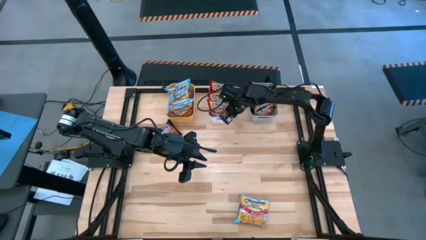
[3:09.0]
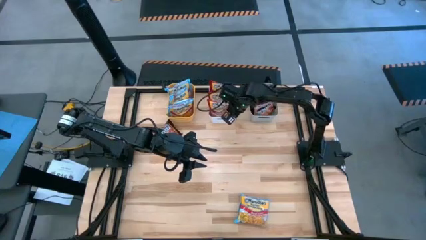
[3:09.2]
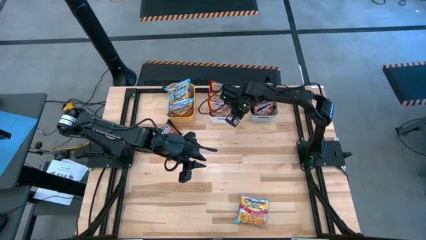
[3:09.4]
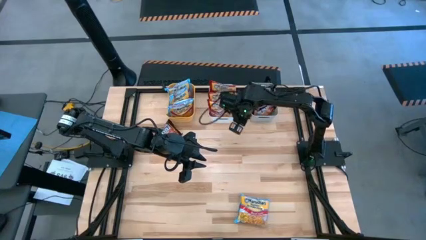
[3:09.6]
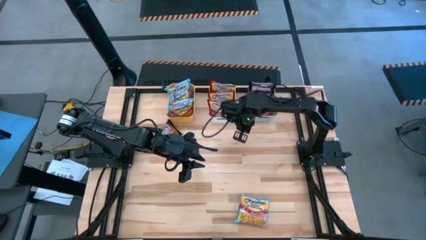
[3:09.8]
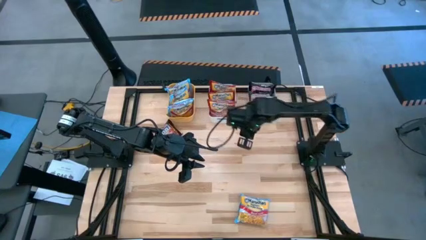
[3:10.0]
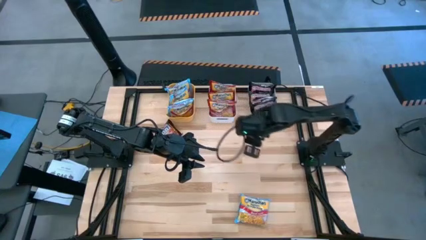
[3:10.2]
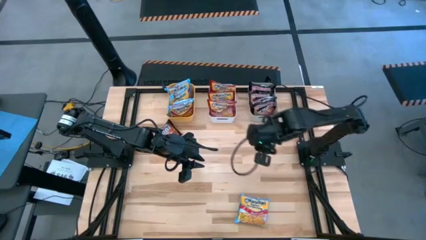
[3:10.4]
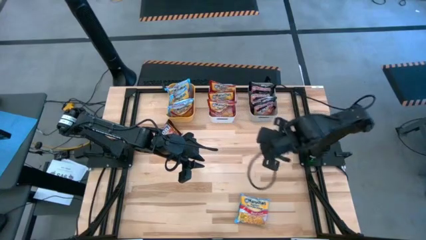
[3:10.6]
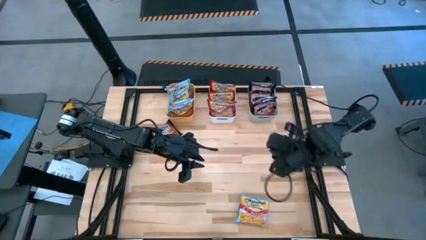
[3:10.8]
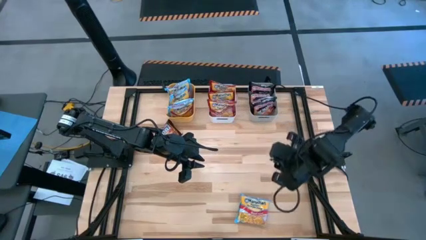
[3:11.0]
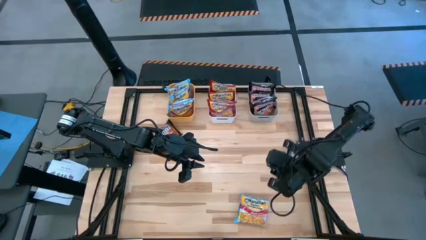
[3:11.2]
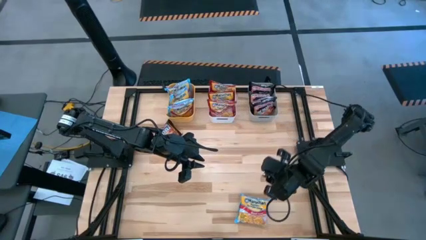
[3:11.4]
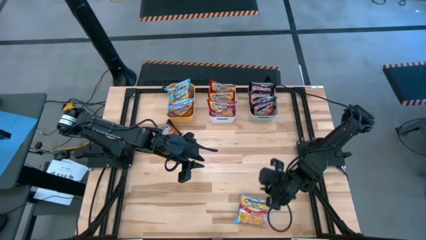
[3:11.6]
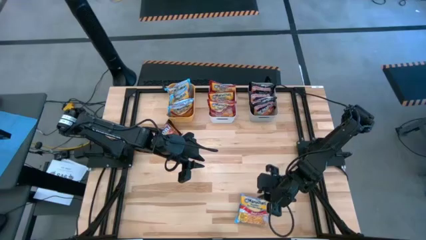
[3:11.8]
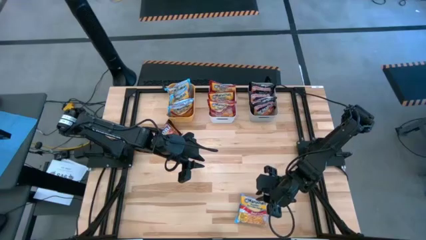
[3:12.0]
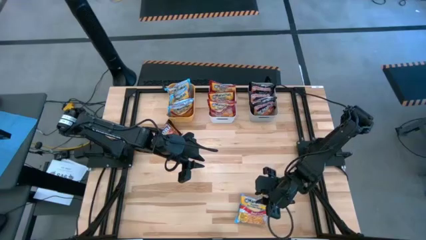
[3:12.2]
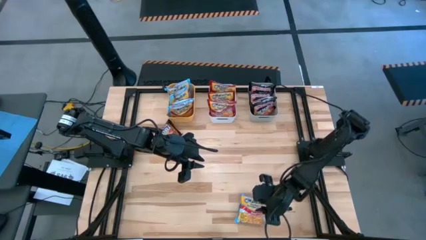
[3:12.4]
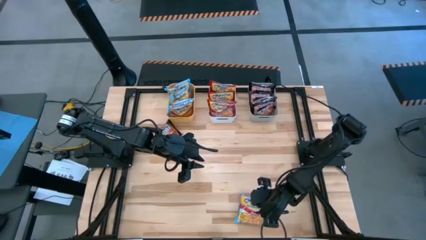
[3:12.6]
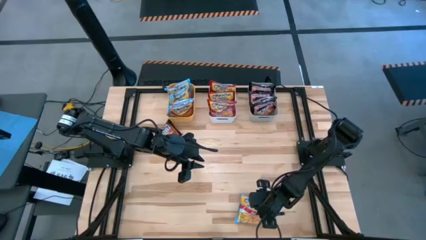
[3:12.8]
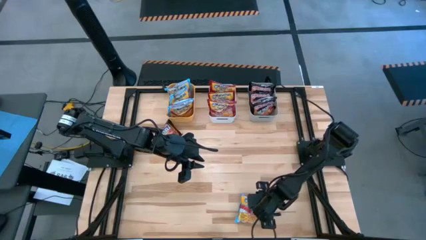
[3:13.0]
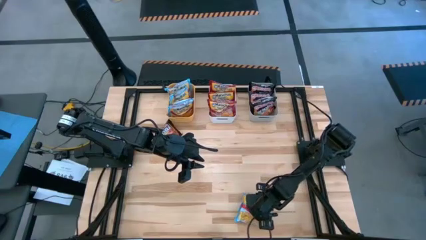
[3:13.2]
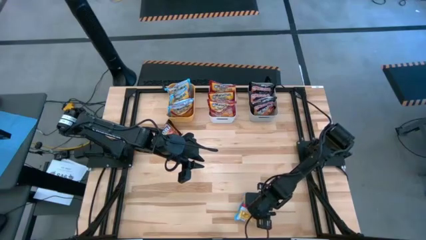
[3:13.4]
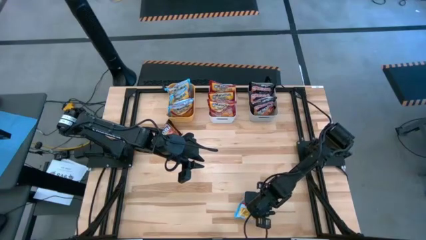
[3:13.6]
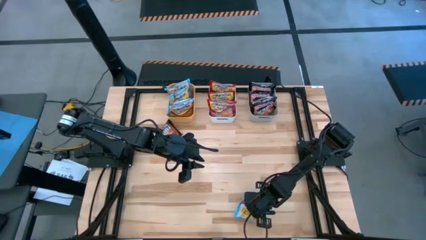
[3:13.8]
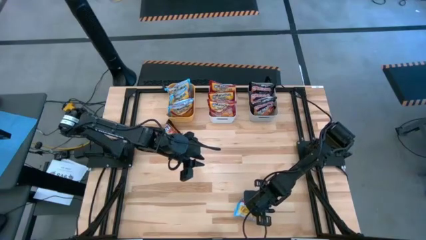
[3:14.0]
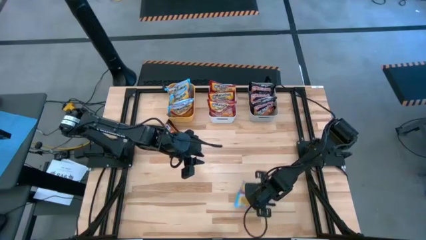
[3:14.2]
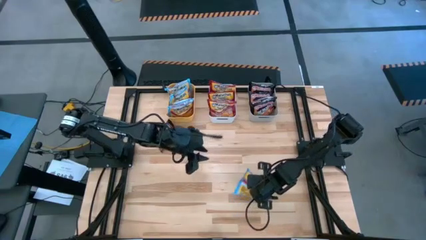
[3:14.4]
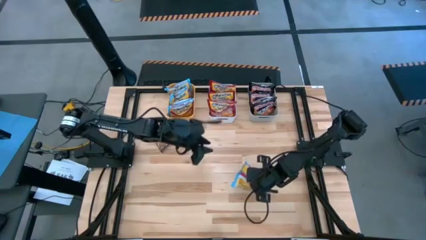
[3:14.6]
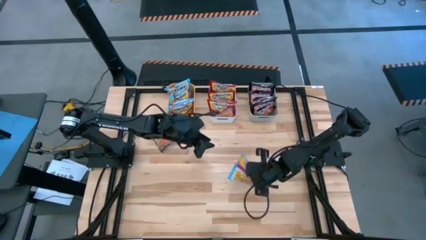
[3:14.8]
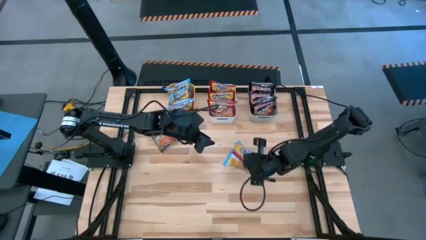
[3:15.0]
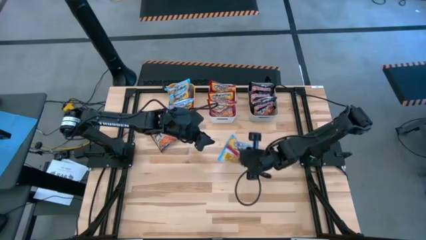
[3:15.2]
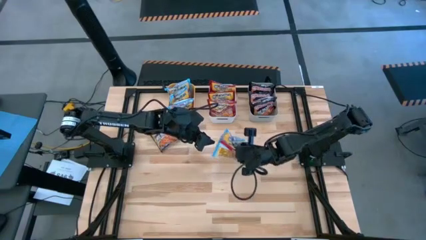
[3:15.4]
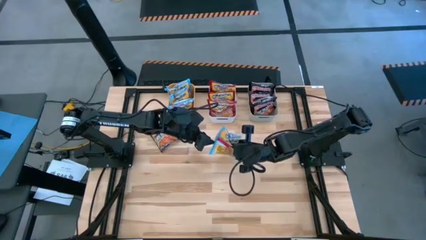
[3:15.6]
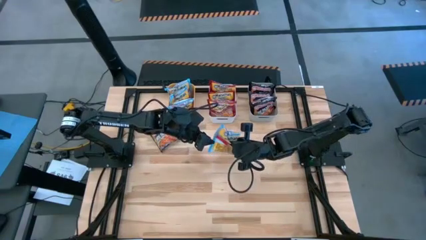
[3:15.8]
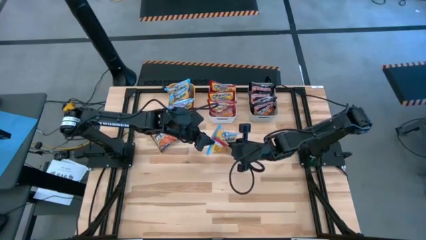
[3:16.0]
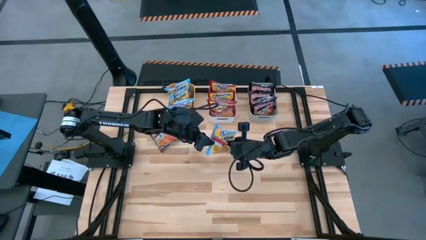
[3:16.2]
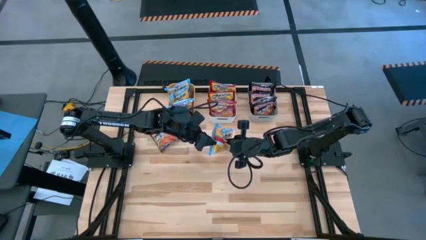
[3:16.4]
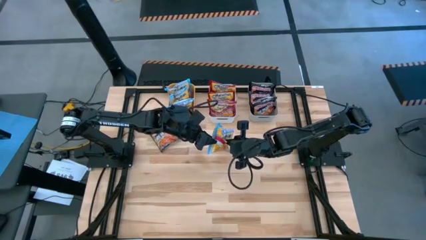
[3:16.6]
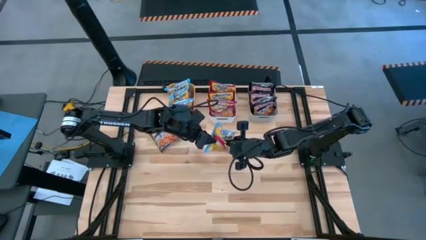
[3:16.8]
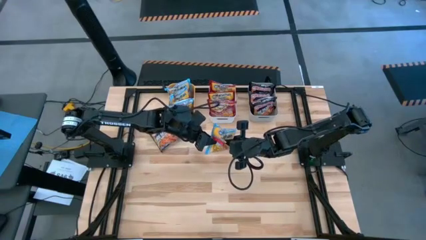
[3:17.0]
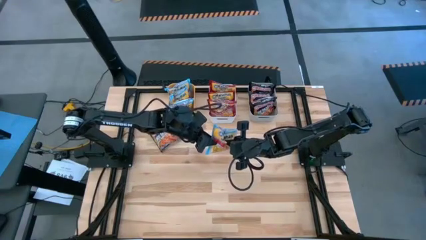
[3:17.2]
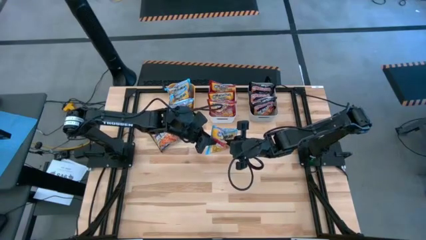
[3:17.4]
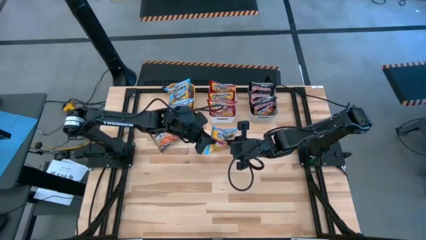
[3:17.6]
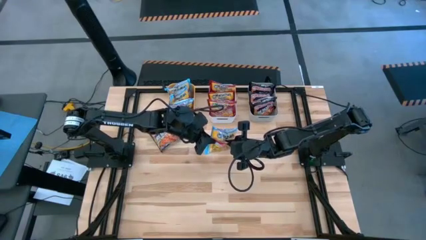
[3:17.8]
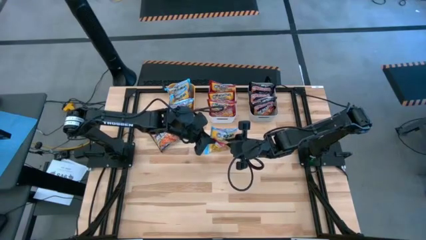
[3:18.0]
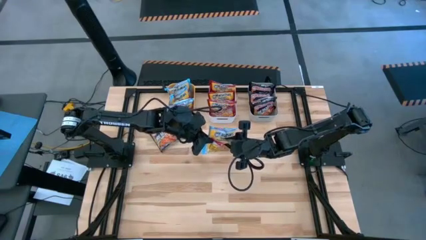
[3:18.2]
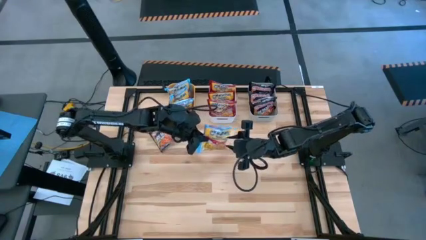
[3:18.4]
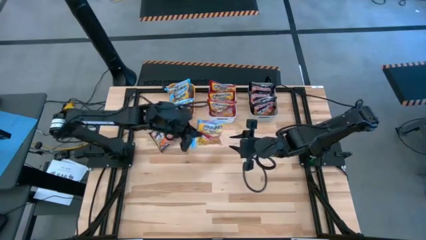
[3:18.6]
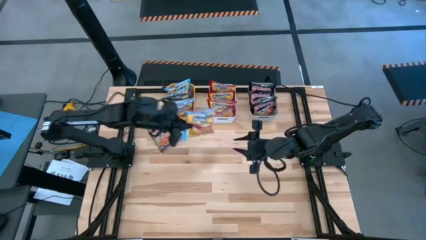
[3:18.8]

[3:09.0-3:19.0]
Task: Sort Maruchan noodles
Put the blue noodle pack into the orange bin

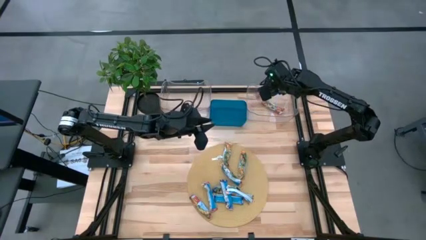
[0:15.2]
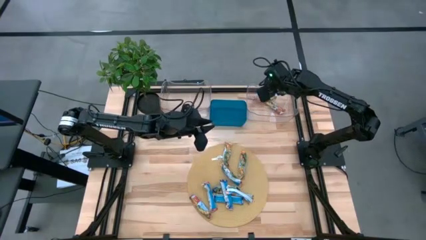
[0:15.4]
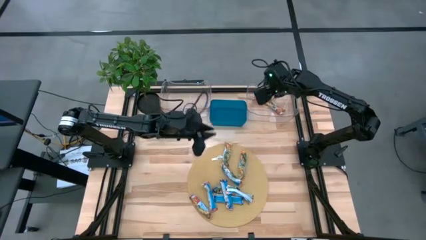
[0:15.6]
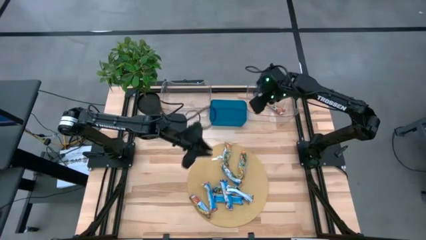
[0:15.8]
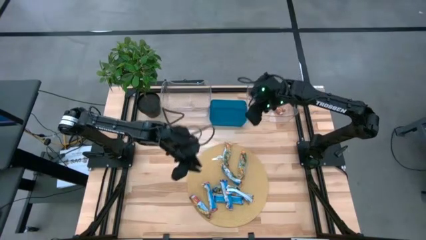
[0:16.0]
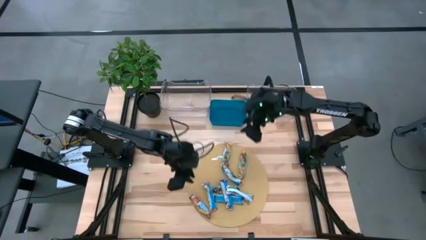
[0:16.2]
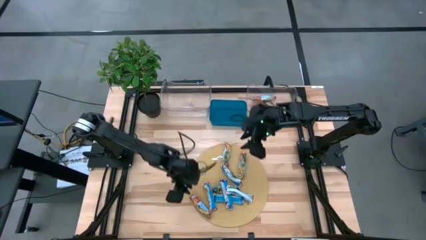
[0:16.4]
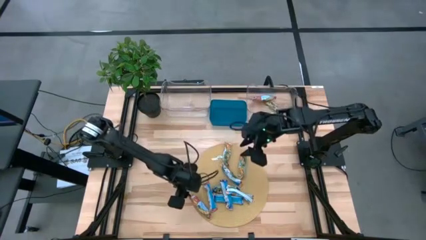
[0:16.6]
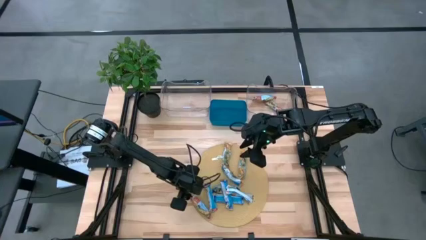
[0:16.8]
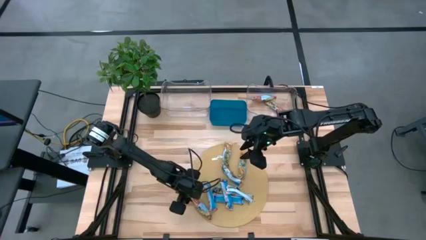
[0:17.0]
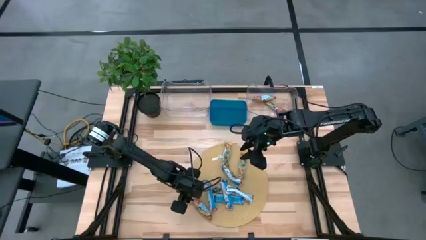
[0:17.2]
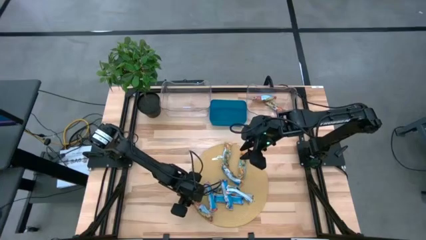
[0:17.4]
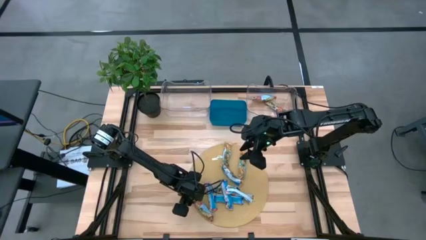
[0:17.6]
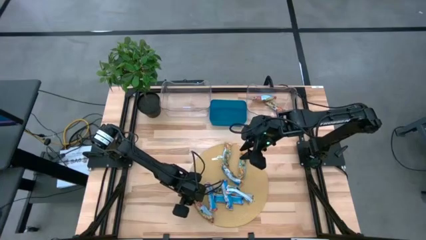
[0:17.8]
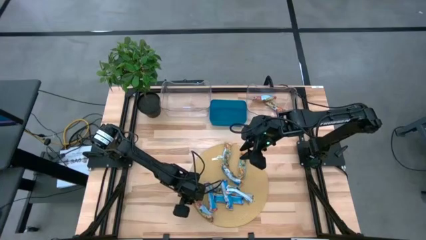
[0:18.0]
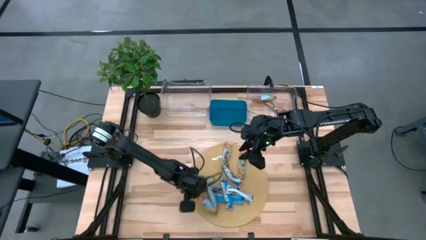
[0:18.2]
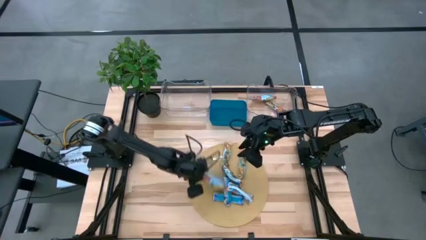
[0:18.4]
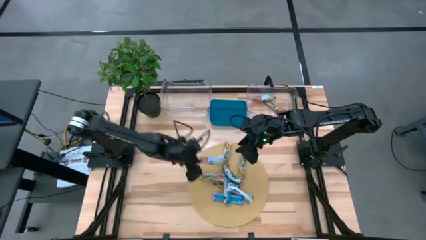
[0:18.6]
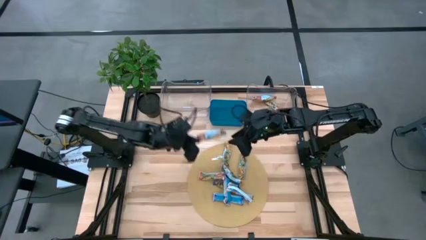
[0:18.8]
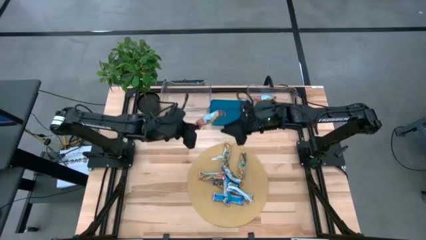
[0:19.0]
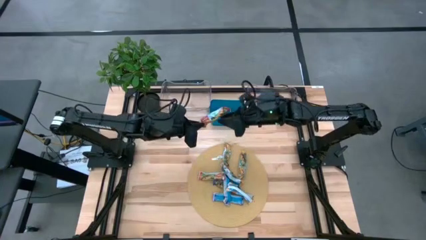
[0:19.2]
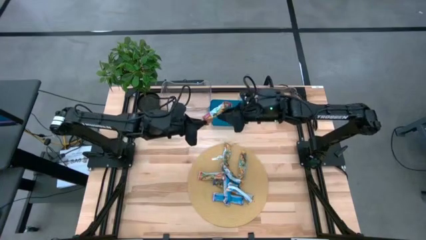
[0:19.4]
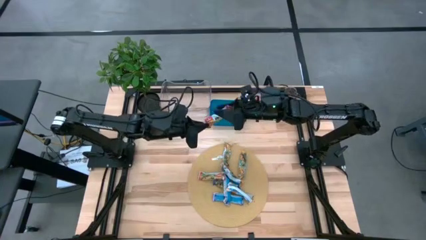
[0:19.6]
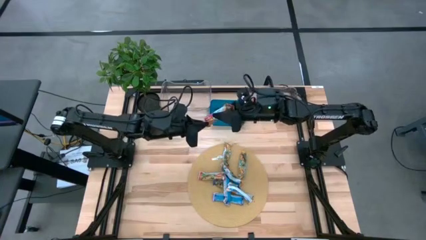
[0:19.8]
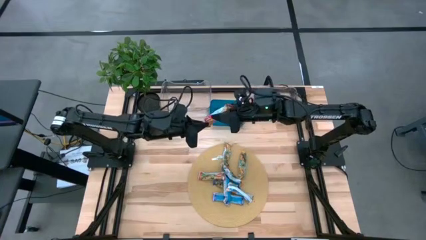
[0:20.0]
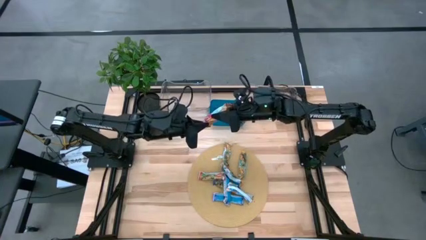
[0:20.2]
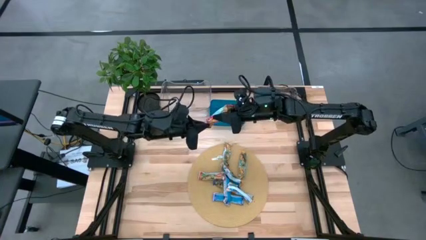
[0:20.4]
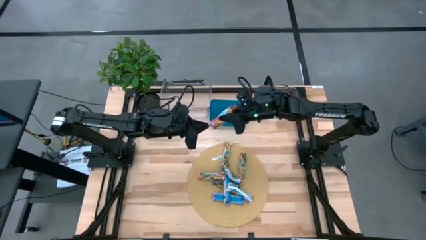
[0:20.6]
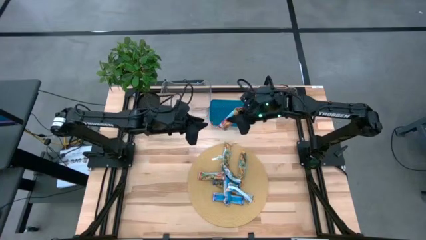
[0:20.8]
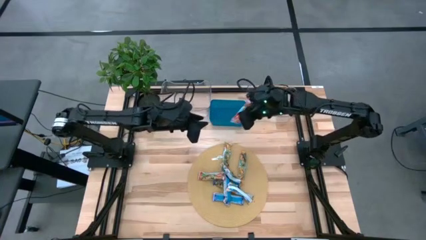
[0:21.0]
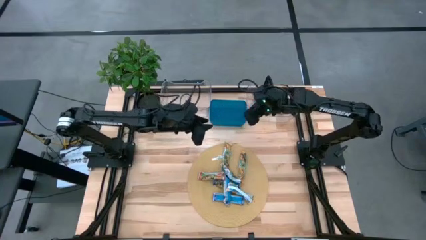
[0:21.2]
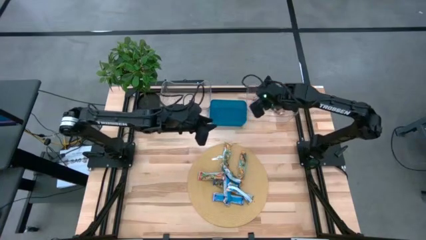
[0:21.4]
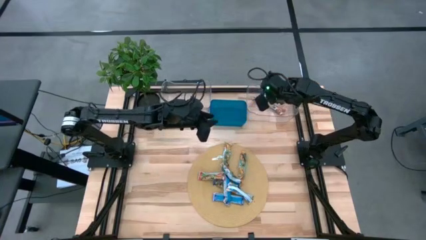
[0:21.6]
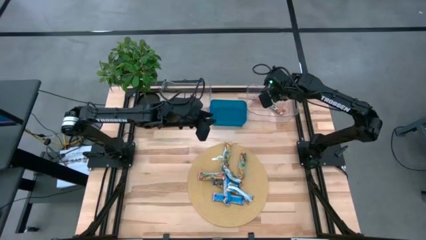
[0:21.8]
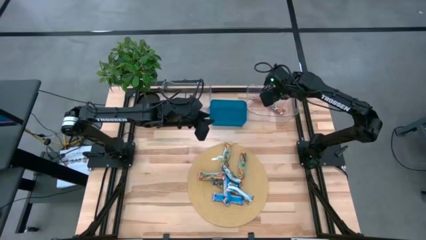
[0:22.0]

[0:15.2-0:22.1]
Task: Pick and place Granola Bars by type
Put the red granola bar into the right transparent bin
